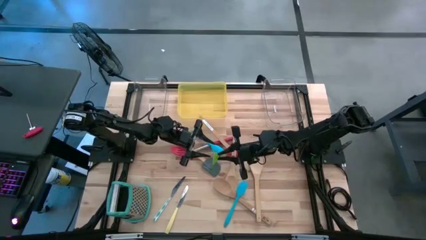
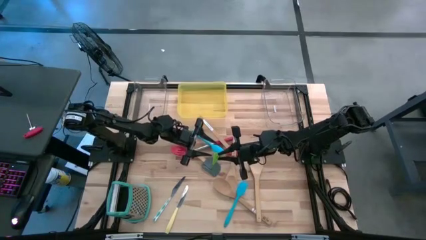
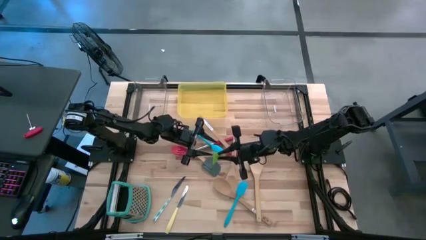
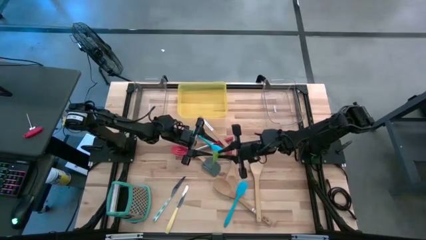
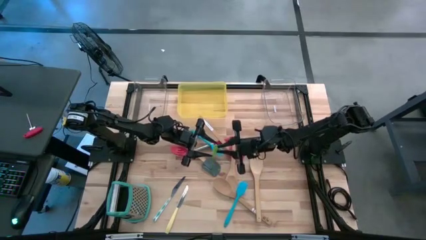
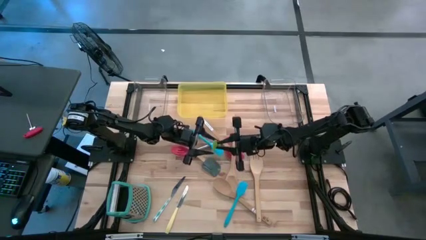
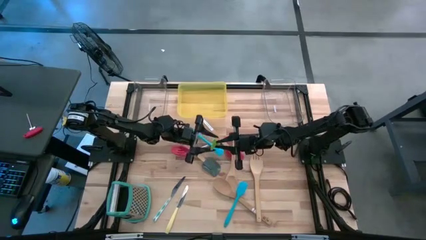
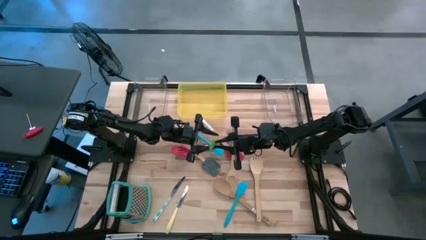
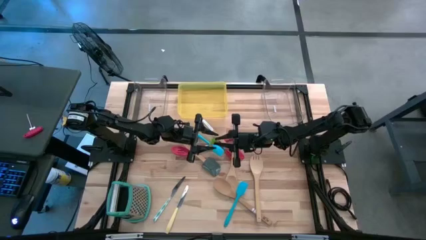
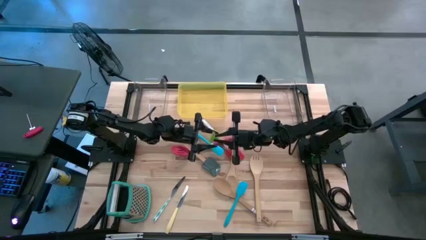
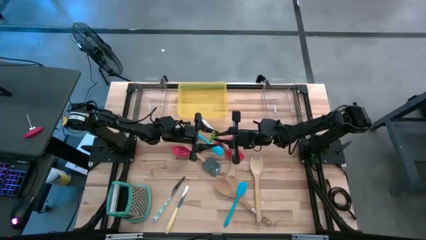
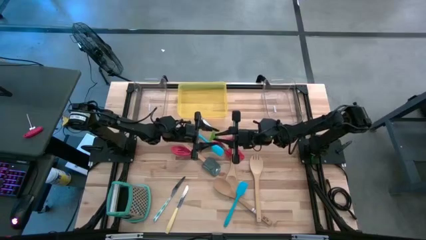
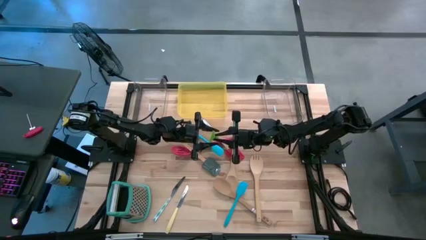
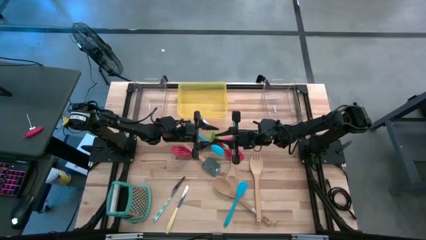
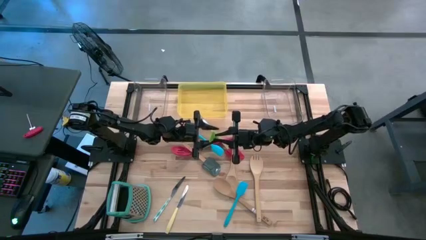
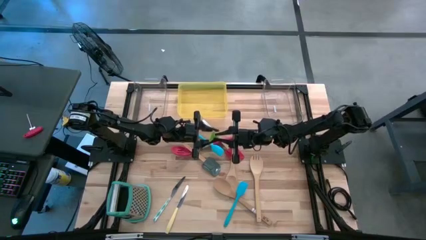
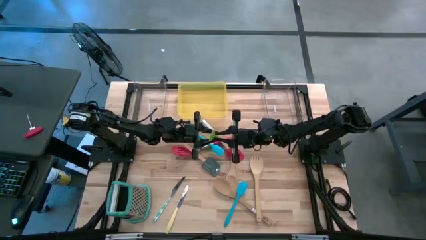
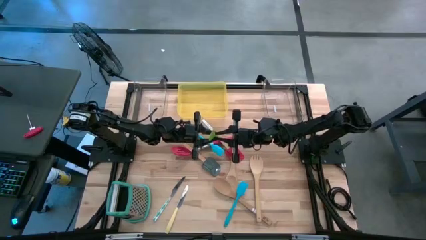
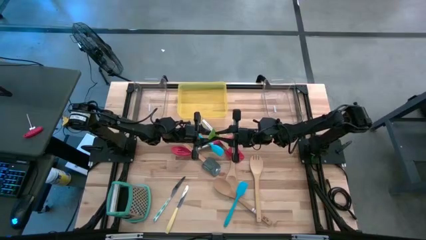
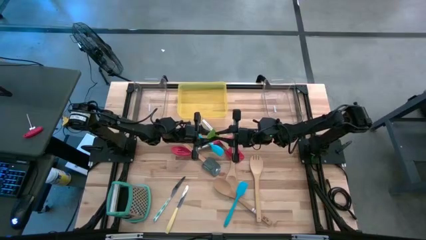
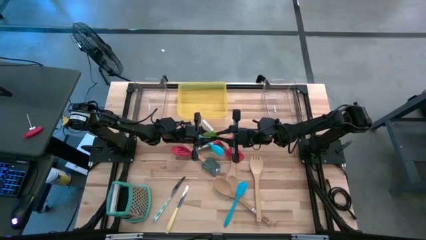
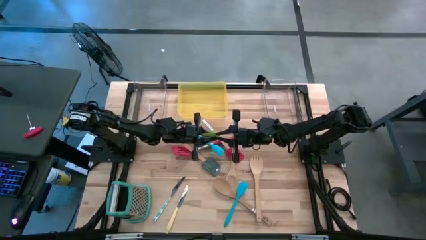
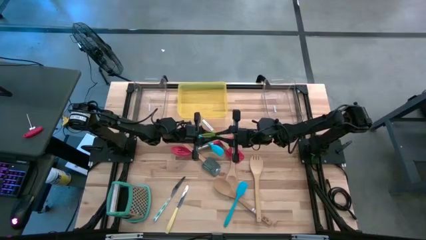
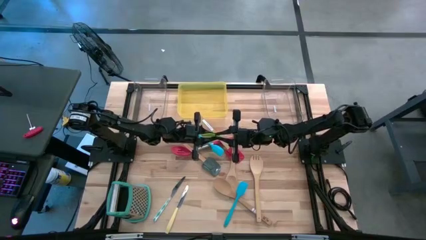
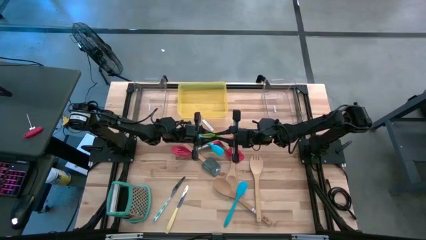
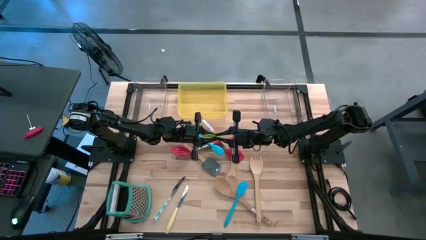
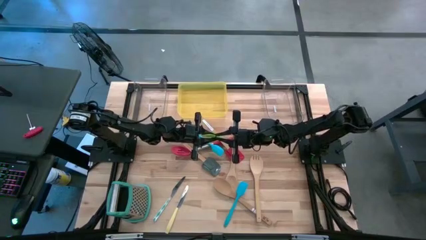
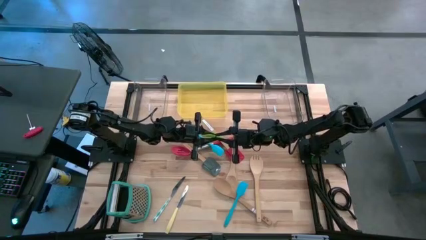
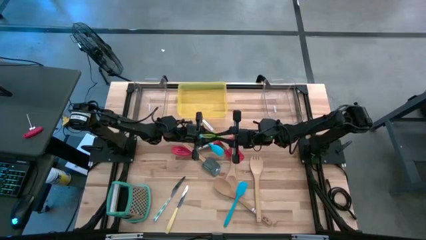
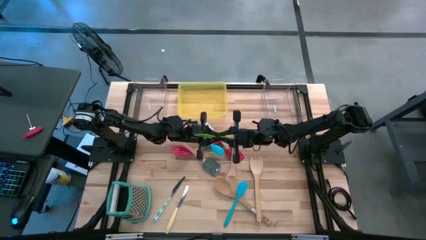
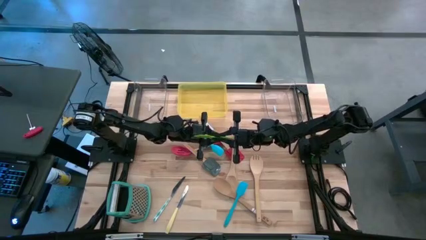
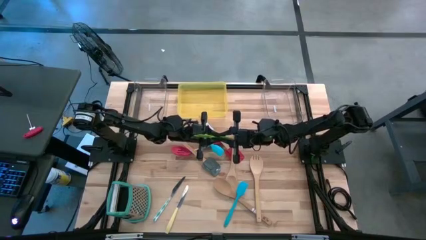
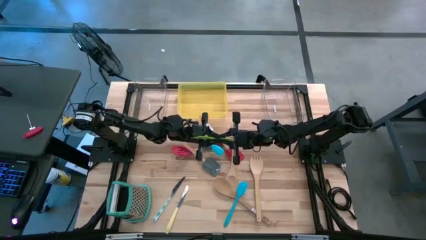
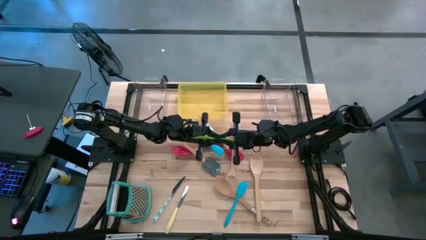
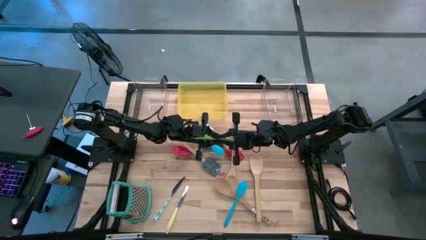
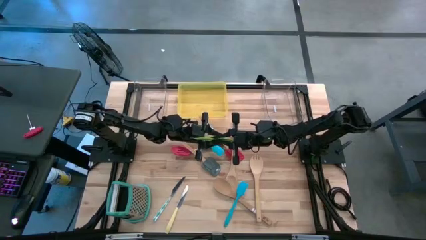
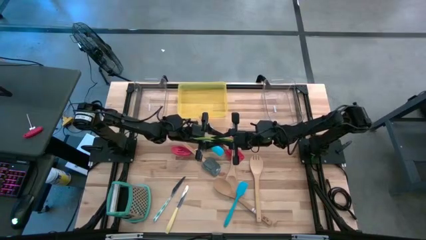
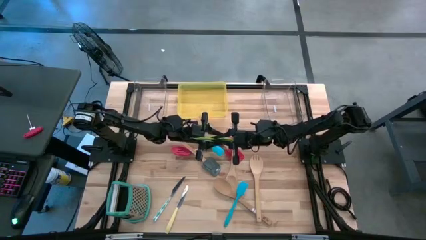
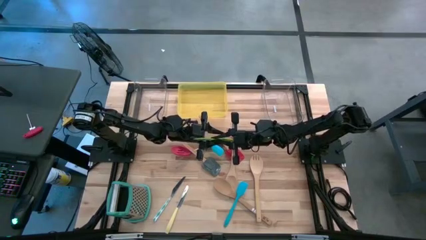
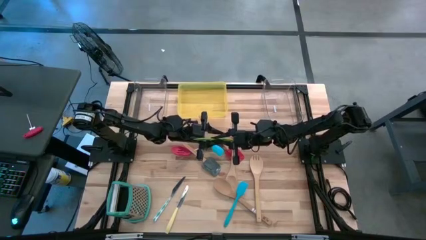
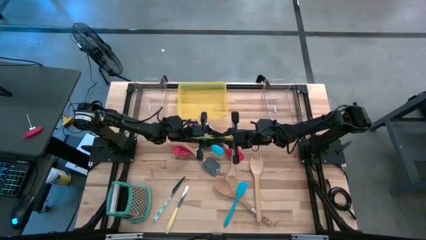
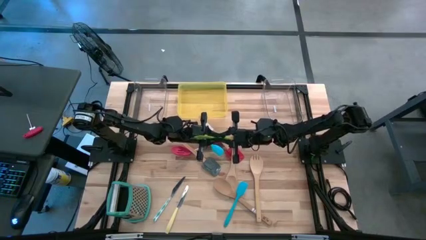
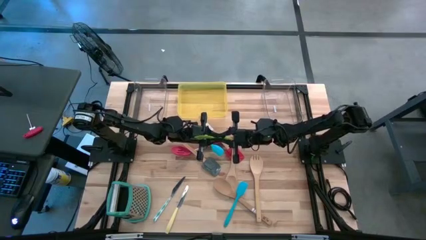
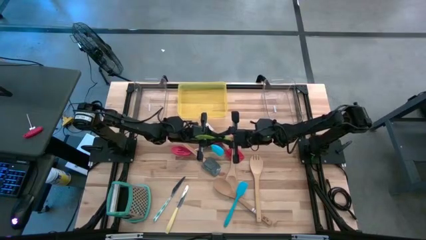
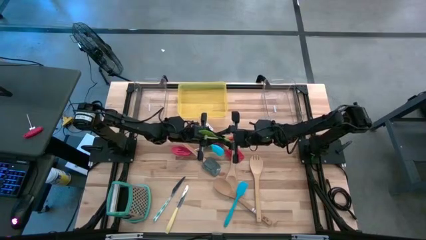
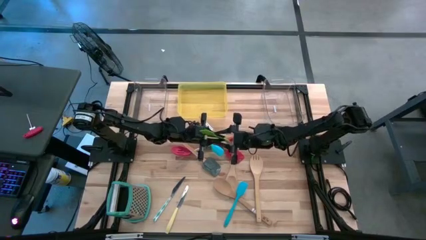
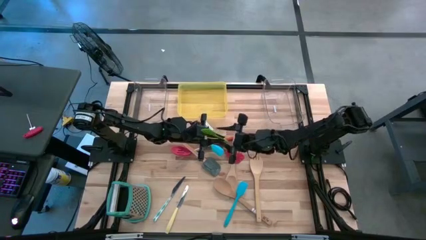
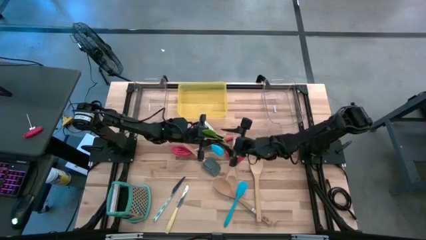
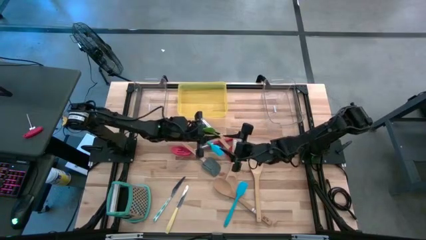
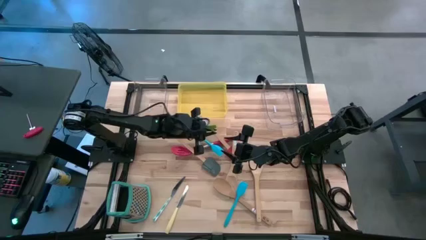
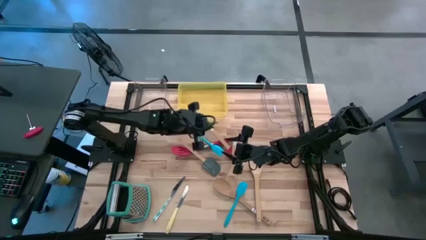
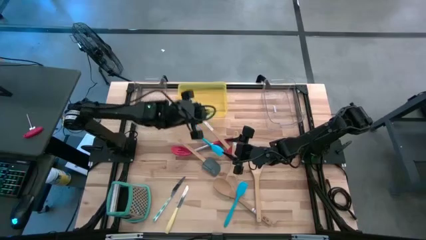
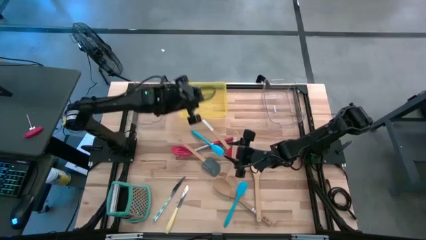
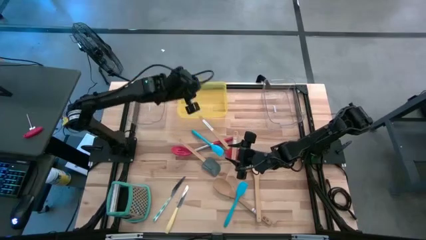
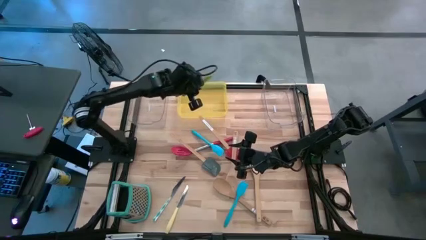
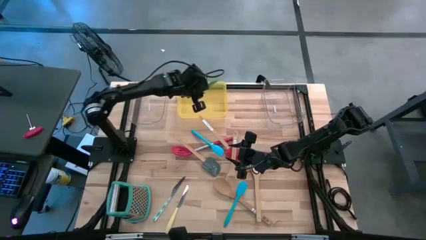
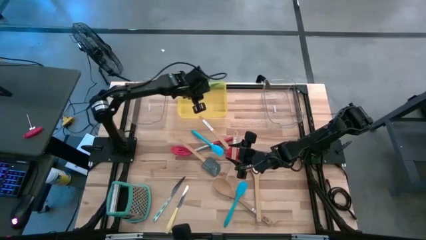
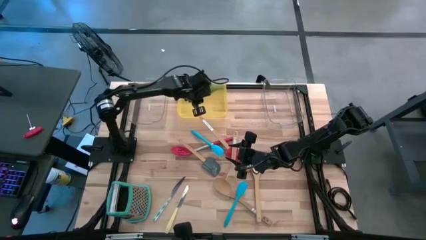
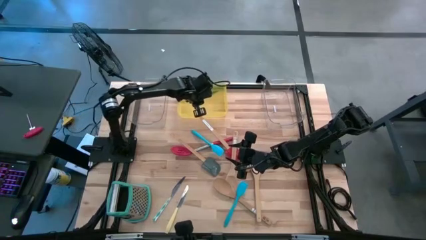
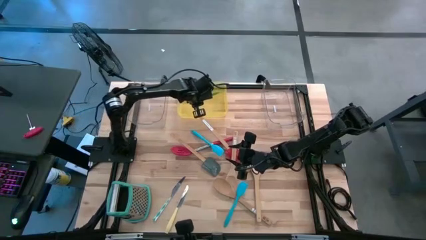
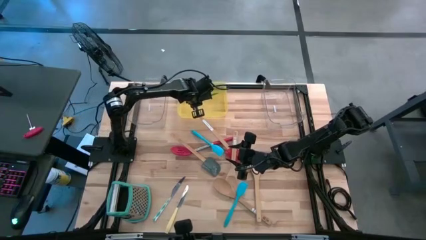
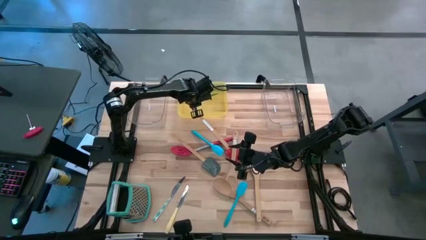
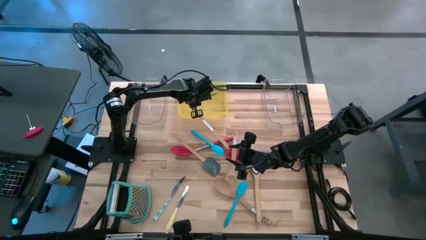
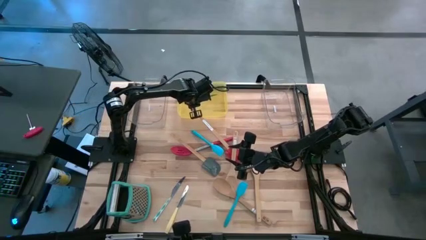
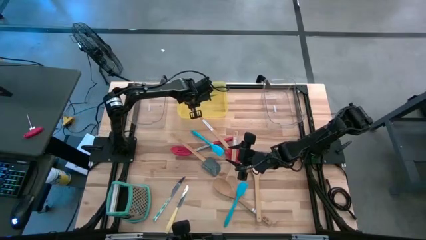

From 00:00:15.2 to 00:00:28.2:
Task: Pick & Place Kitchen Items
Put the green spatula into the yellow bin

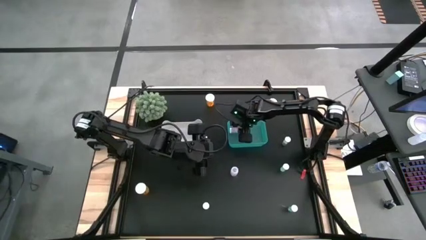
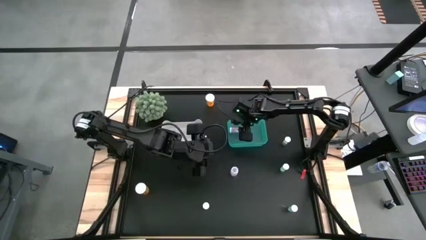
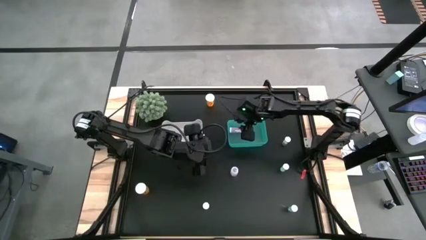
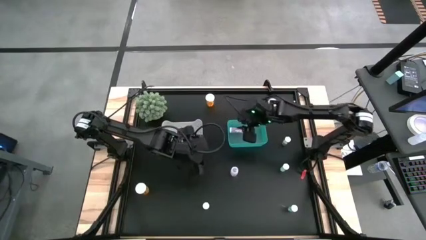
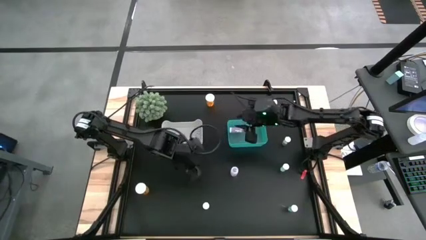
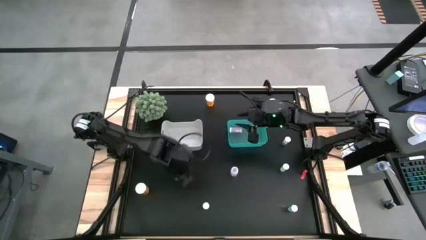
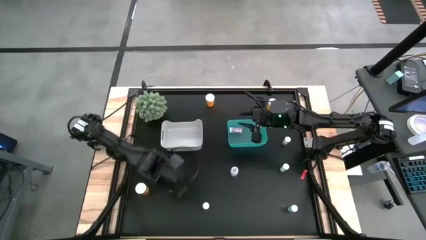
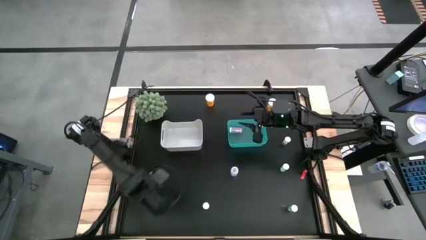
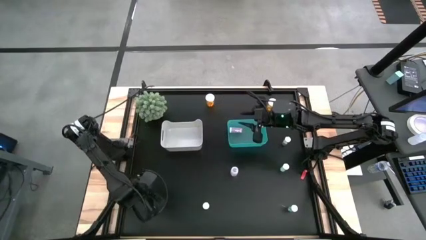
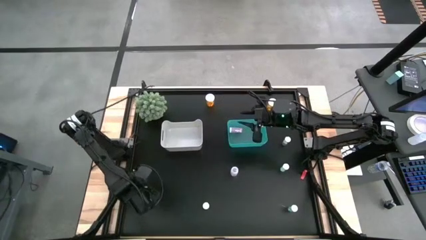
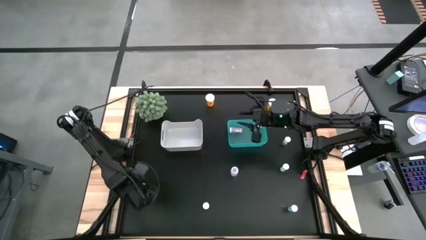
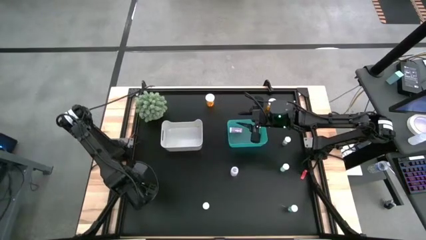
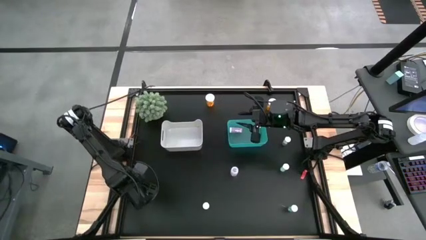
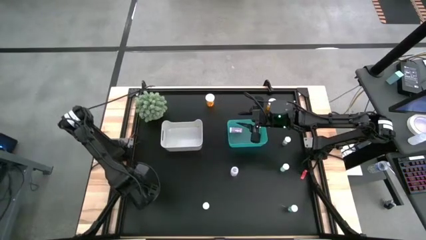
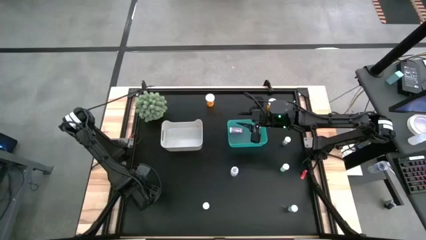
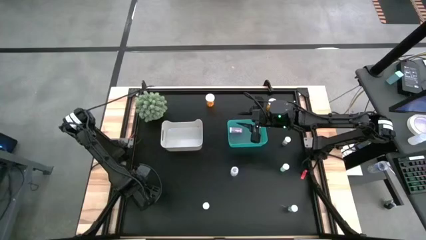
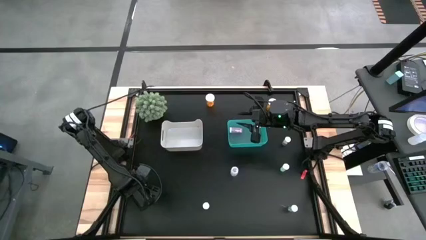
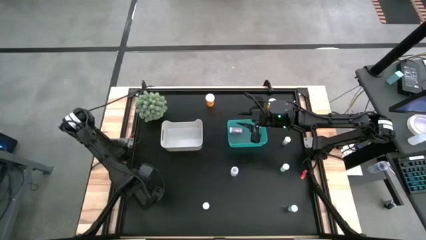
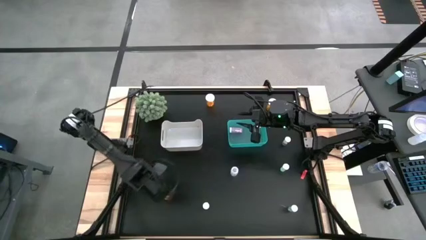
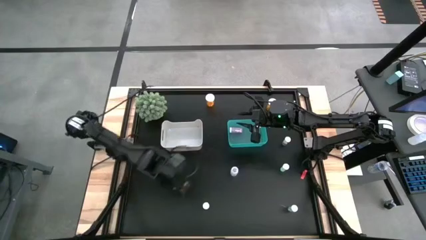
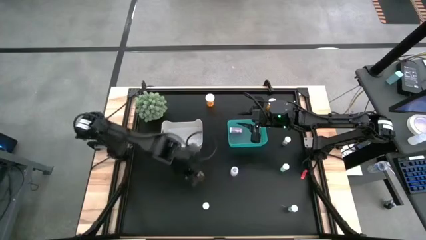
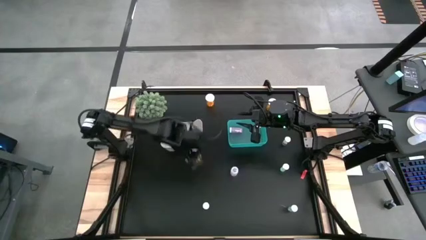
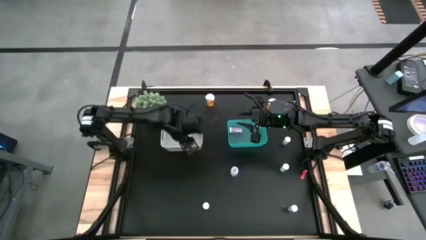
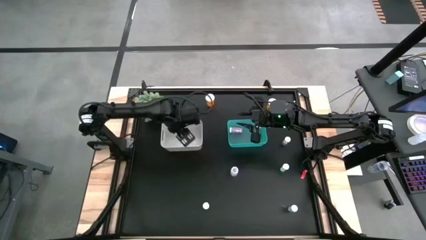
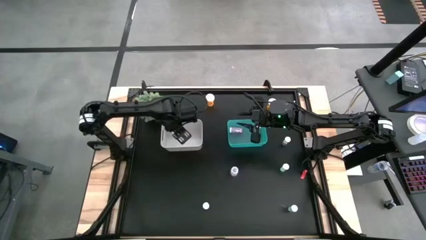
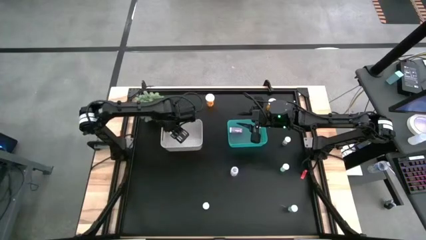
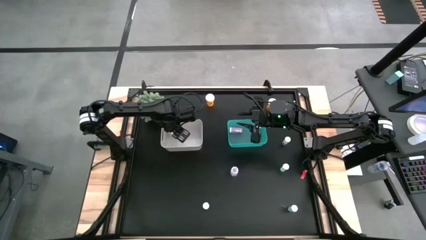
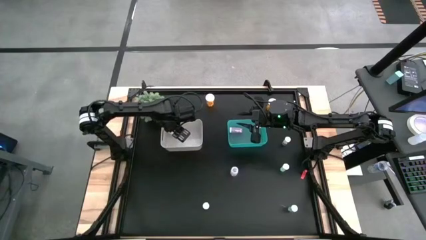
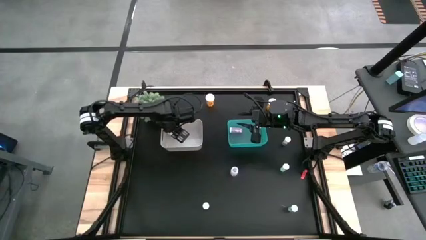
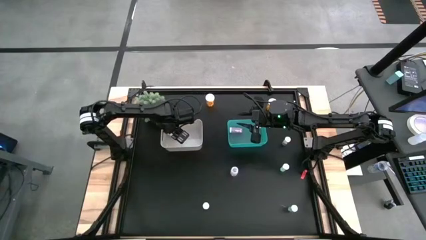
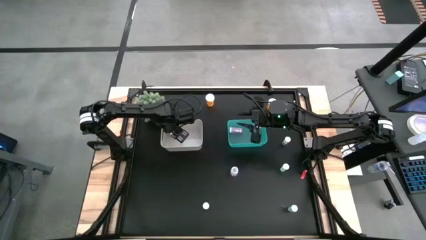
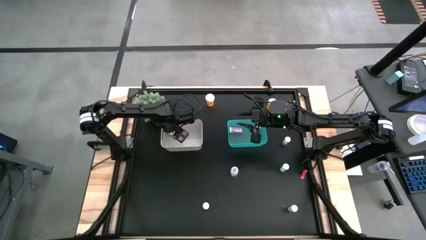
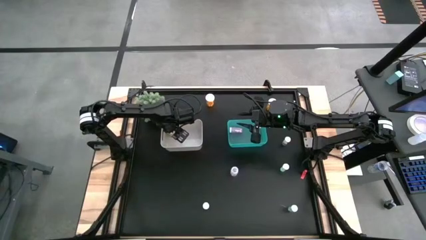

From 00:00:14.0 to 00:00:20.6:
Task: Pick and place medicine bottles into bin by pill shape (circle, oval)
Put the bottom left large orange capsule bottle into the white bin
